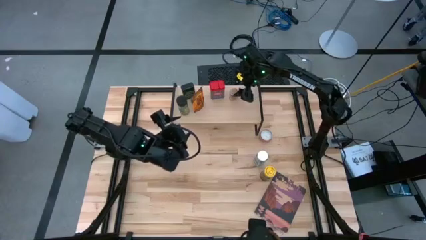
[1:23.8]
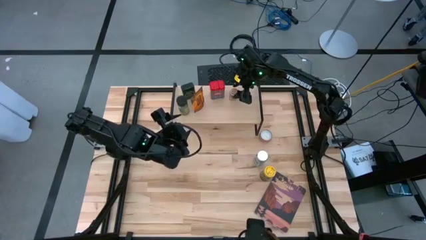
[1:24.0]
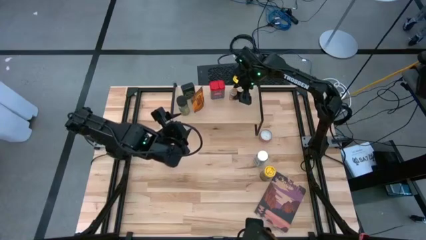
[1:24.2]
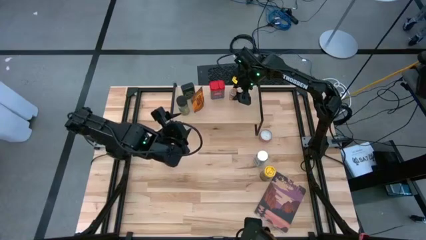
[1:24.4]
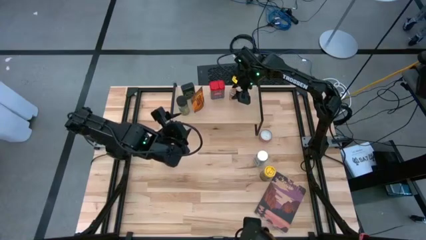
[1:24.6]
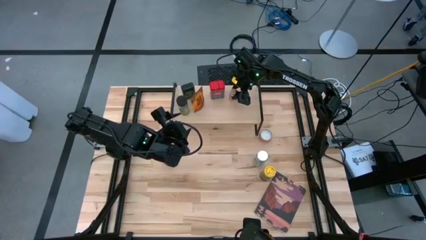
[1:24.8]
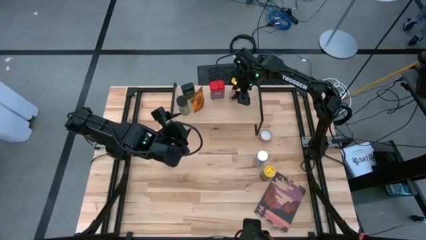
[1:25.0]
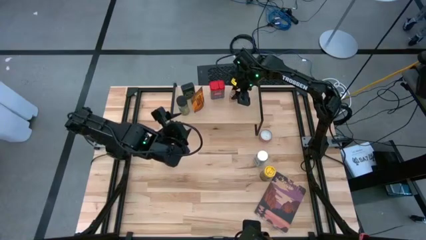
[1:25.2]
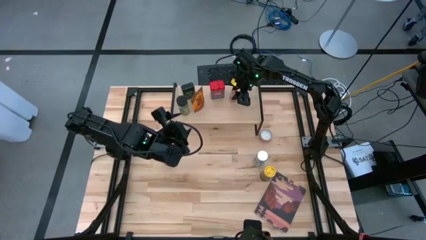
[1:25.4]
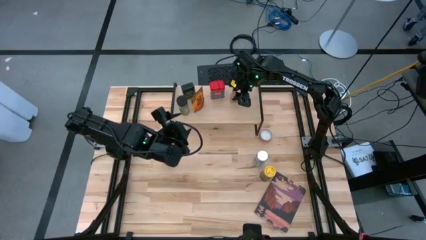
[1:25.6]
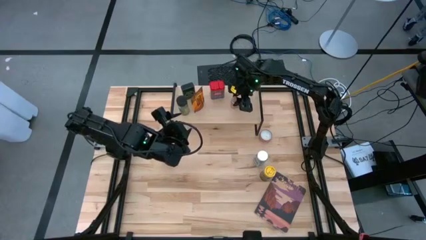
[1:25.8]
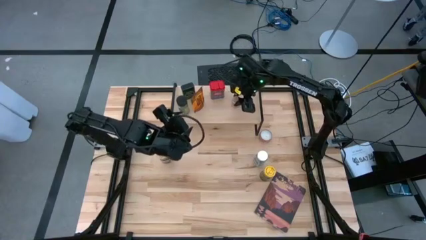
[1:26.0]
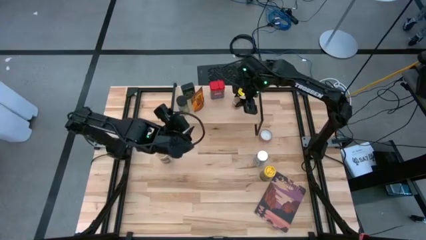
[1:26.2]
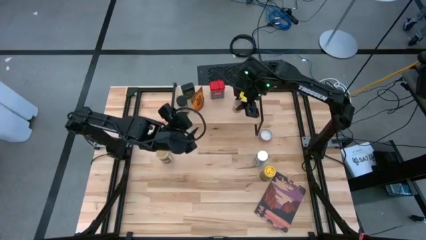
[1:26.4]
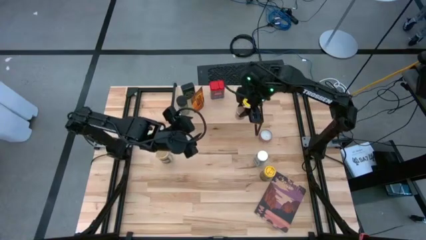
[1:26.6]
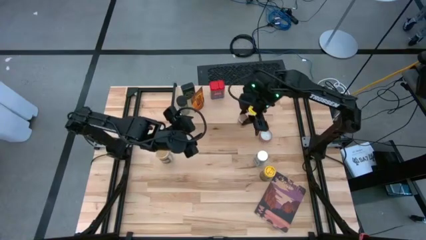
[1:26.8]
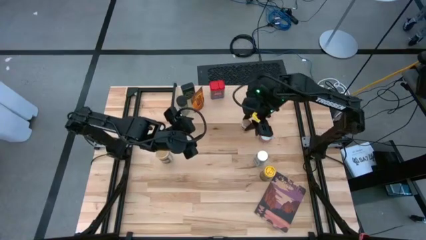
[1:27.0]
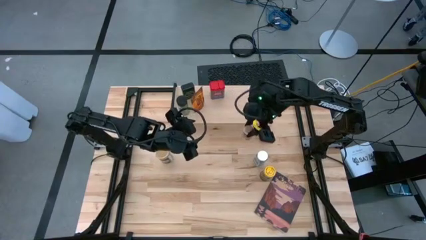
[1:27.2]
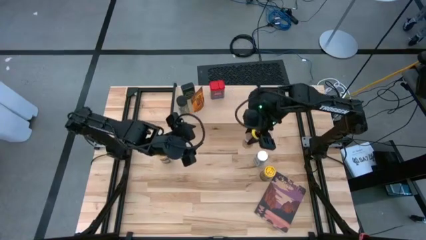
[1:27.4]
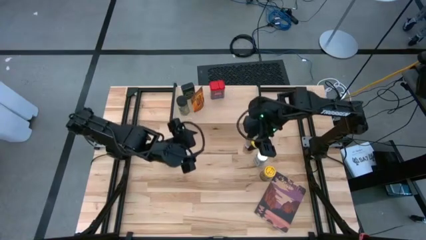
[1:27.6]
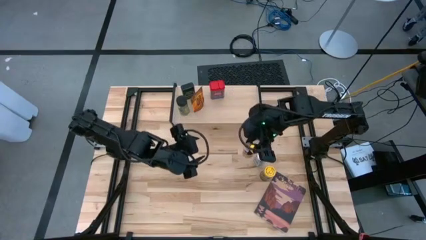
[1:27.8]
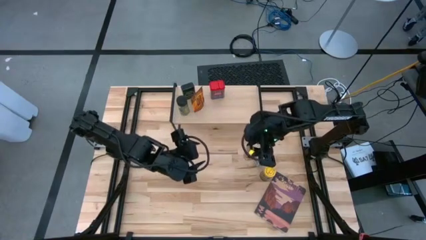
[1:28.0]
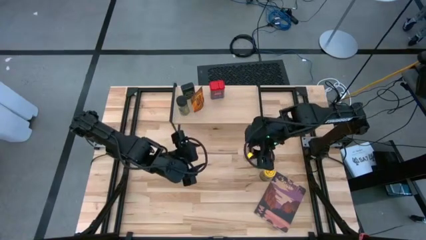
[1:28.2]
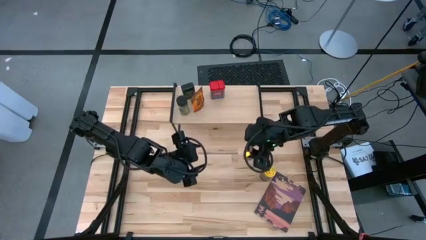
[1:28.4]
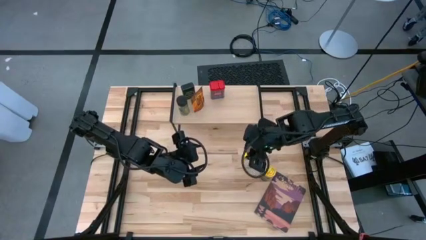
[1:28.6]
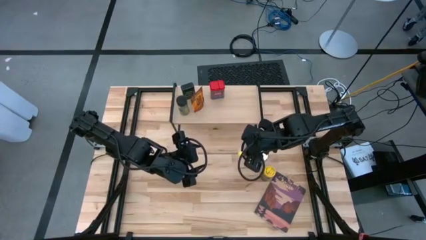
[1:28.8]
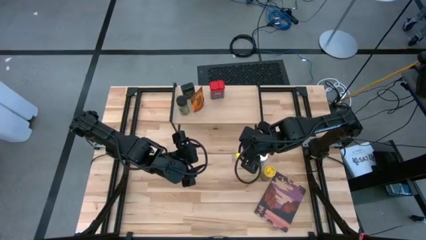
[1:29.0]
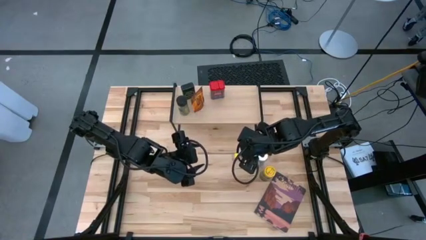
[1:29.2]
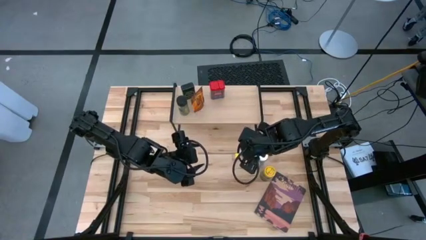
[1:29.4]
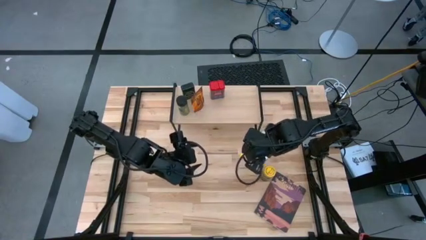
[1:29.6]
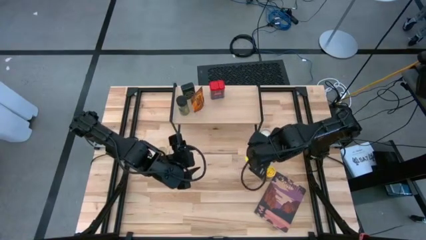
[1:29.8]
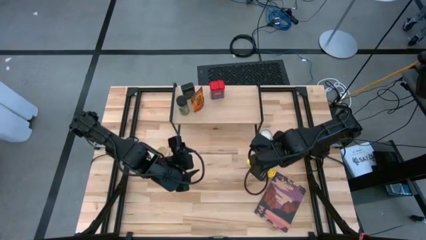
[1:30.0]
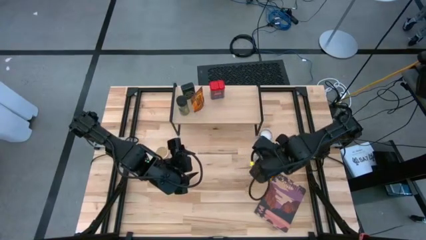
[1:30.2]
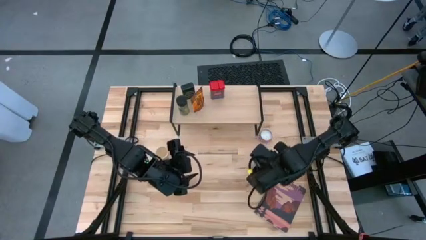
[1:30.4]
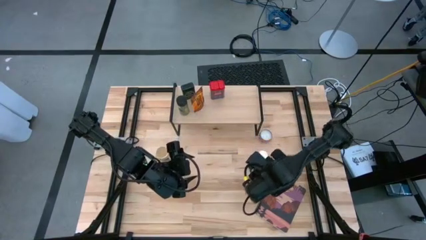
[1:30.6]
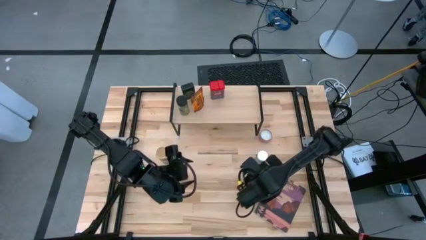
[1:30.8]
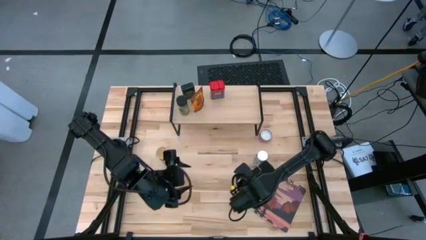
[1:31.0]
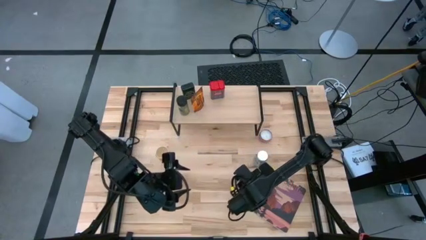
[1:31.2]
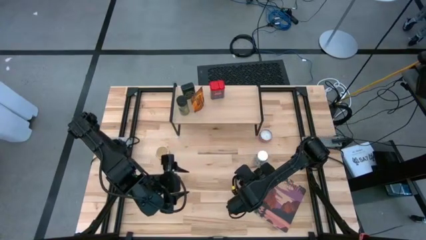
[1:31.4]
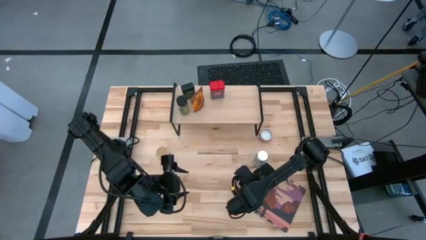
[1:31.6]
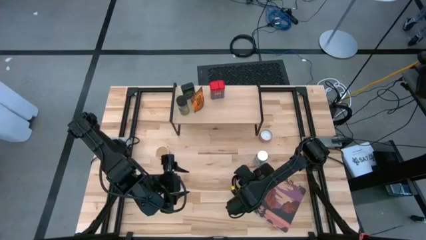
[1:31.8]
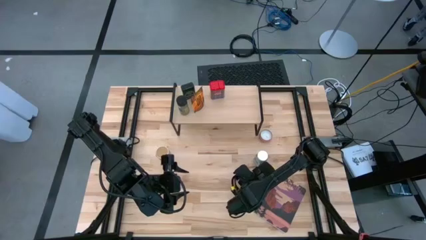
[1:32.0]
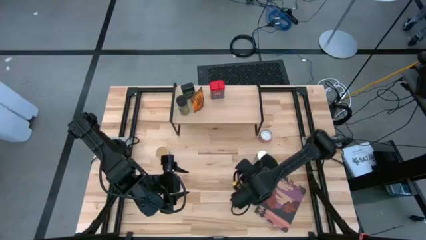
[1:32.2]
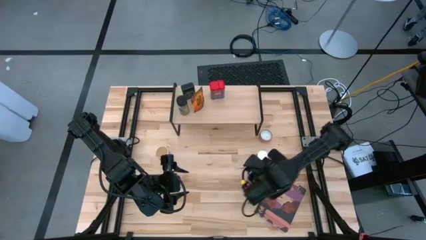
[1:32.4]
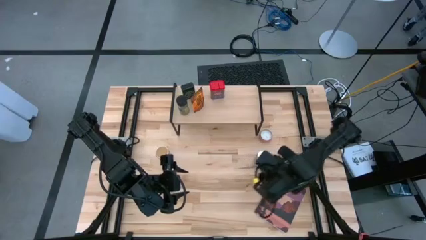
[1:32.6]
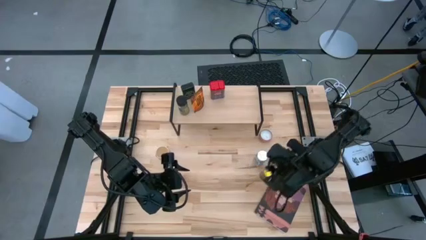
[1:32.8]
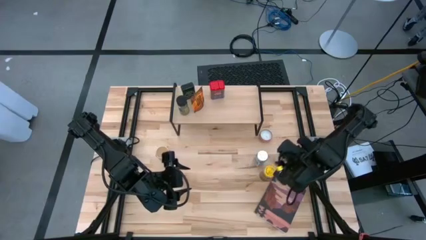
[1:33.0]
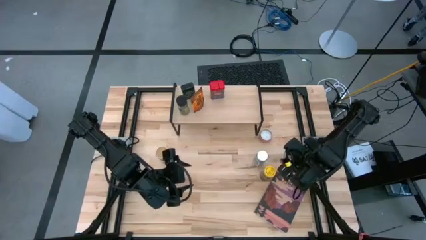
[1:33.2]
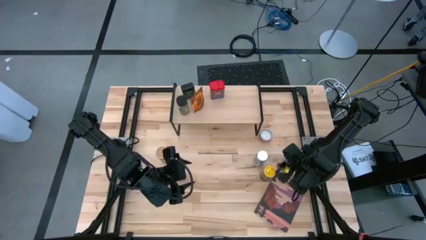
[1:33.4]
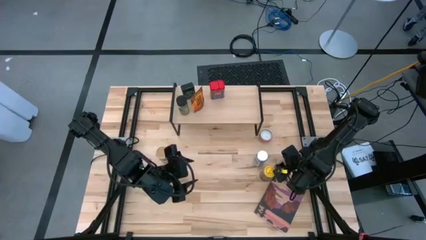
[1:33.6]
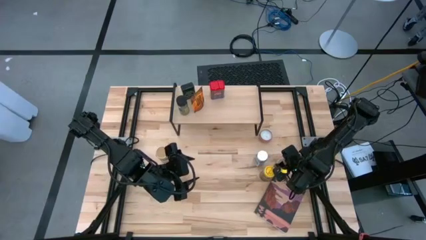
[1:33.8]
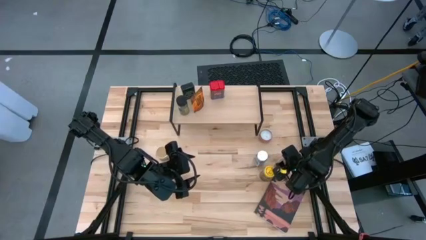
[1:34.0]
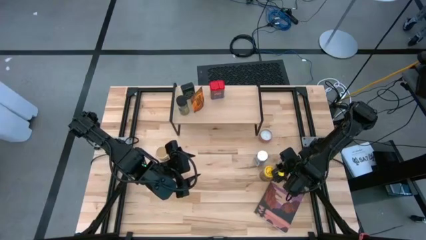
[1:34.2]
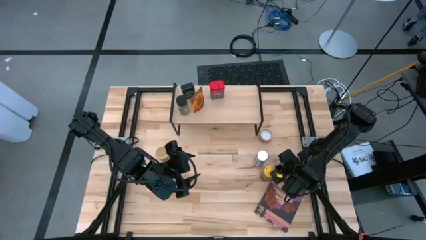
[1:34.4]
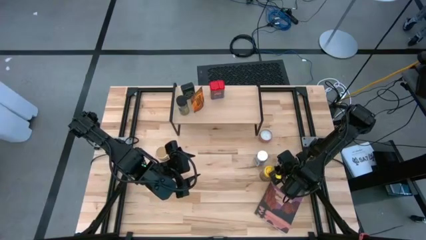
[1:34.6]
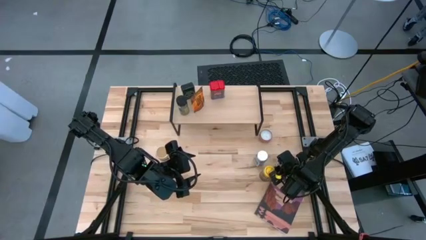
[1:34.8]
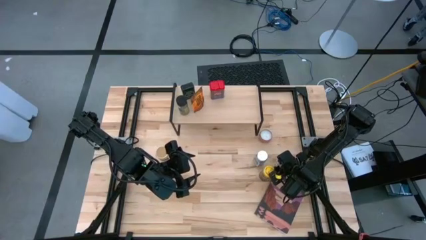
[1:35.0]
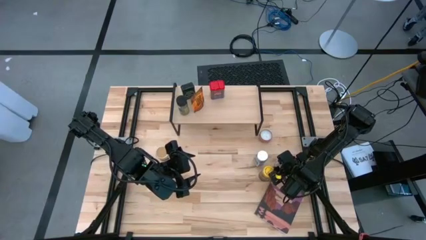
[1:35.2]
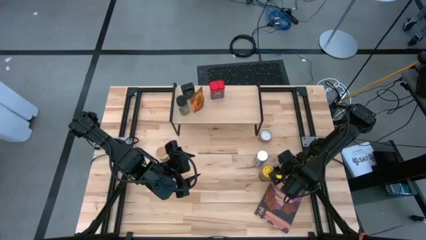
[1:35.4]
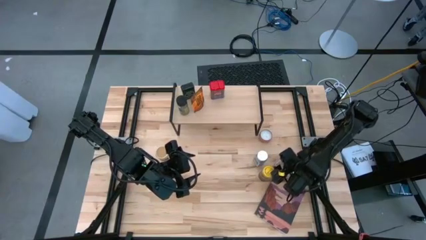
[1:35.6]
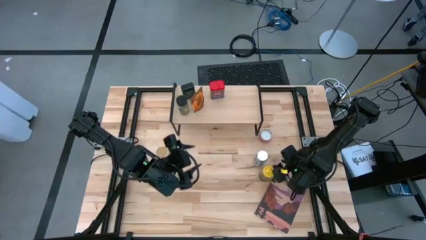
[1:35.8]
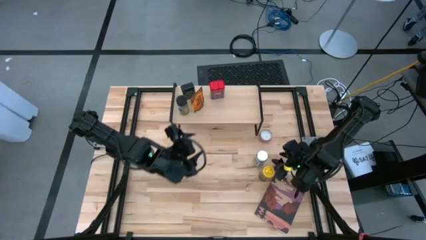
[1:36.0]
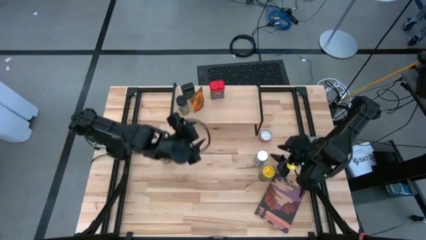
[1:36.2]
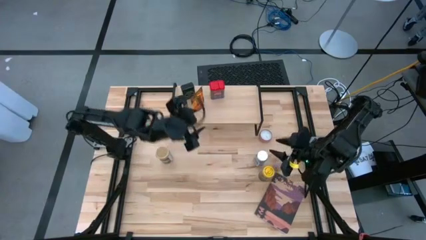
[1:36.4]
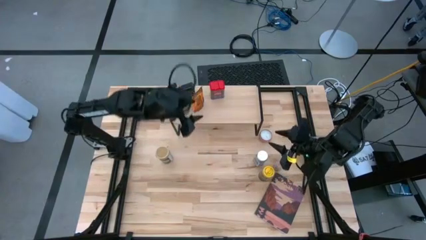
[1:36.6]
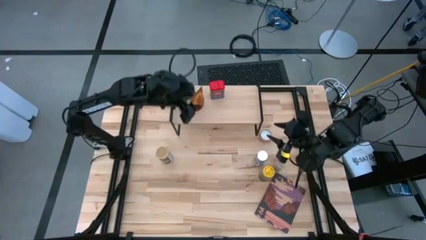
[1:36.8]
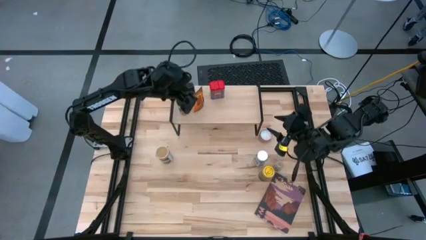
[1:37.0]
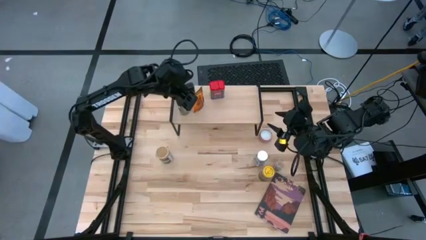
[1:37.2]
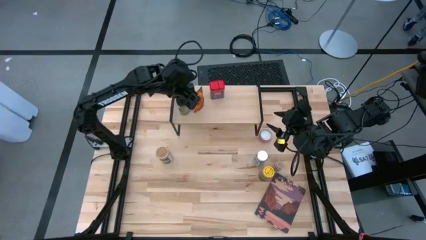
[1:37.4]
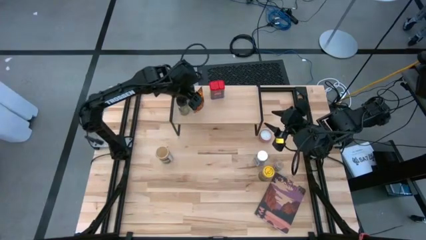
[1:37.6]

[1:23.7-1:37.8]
Task: Shelf spices
Put the transparent spice bottle on the table

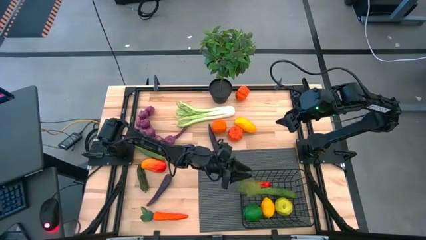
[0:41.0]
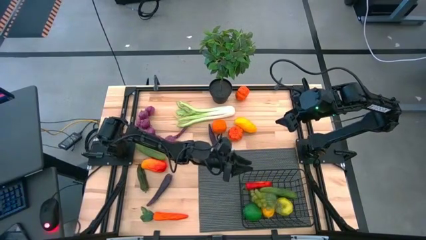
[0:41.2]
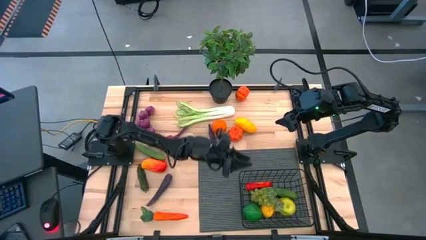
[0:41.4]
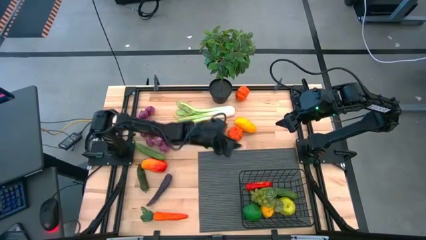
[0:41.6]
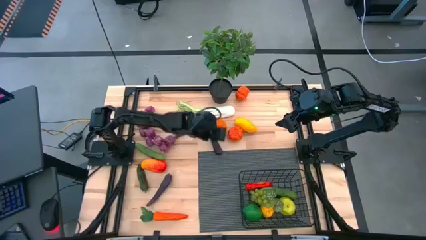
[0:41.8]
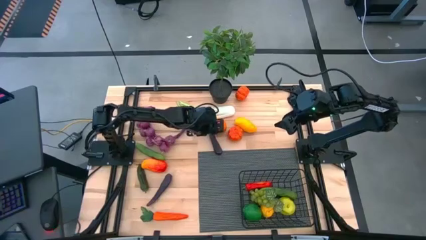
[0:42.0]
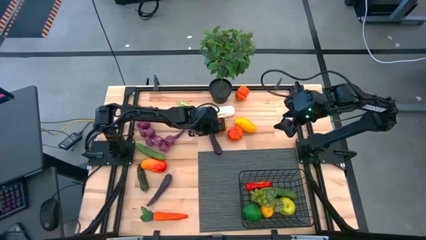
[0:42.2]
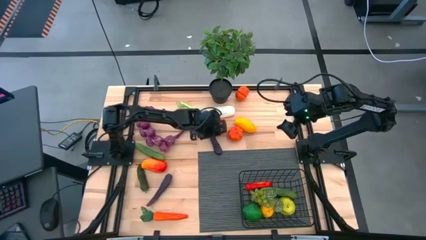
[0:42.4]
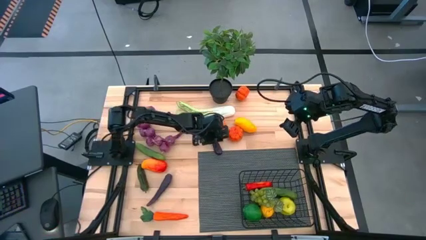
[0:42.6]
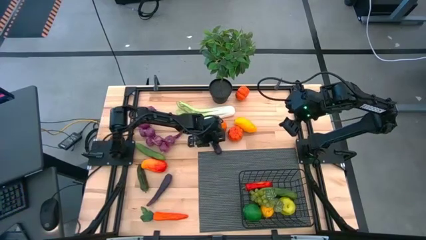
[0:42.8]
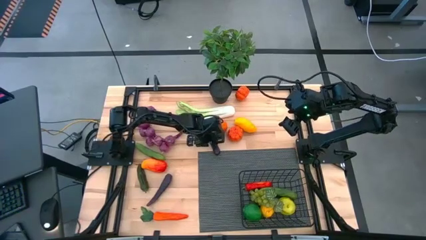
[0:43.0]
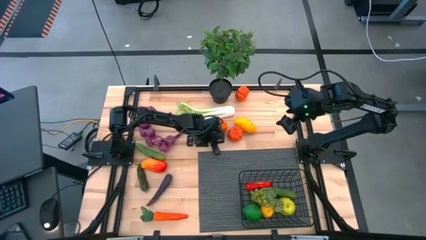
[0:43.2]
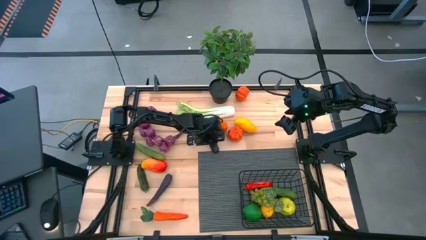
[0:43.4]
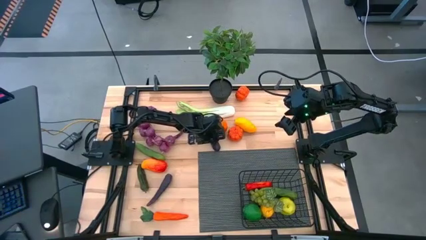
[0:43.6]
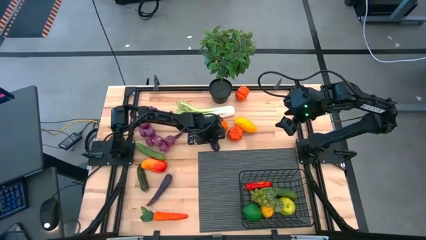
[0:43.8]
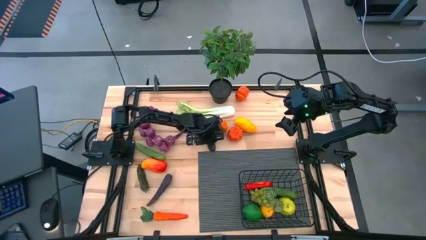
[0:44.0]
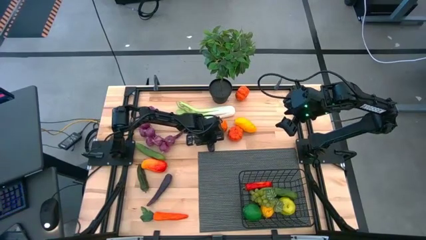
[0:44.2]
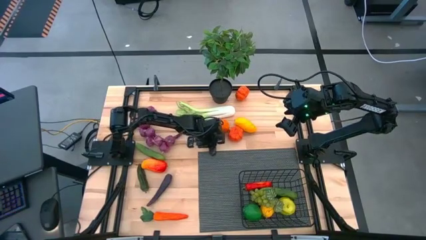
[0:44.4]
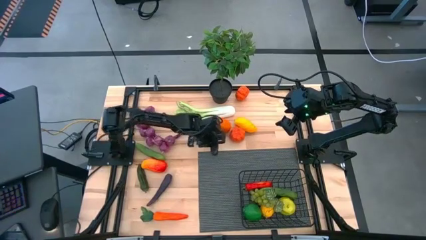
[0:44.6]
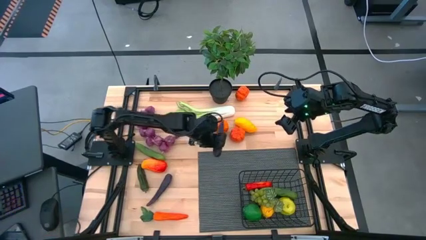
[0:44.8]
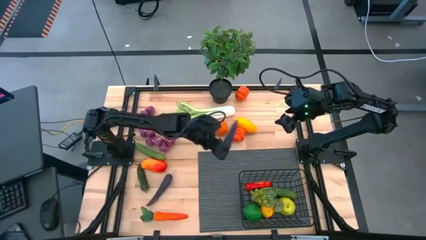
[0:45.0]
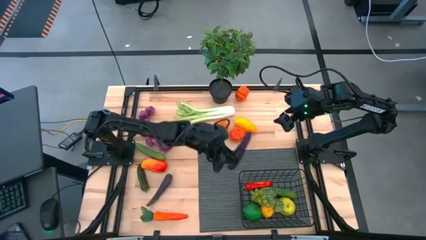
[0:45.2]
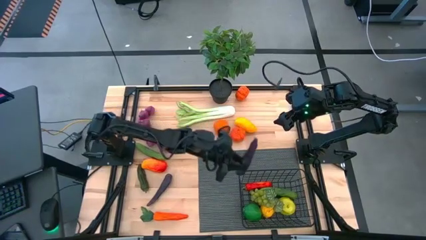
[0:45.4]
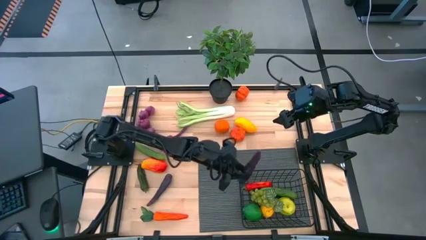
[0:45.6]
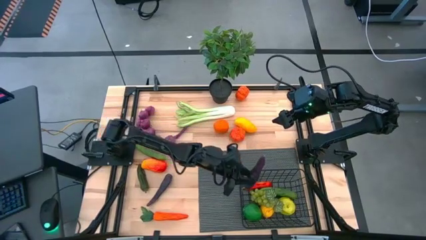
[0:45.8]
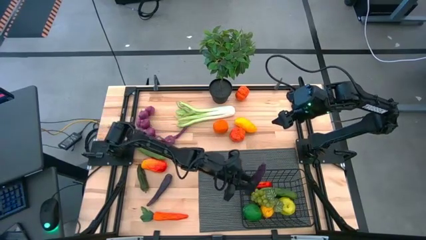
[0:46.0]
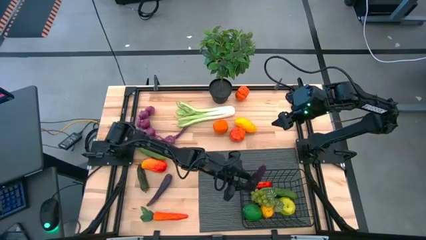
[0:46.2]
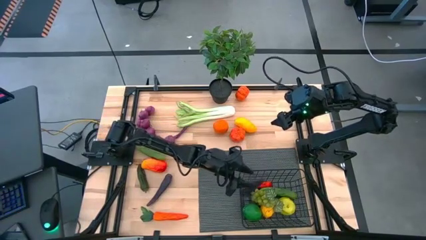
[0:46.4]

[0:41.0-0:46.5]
Task: Build produce basket
Put the top purple eggplant into the black wire basket
